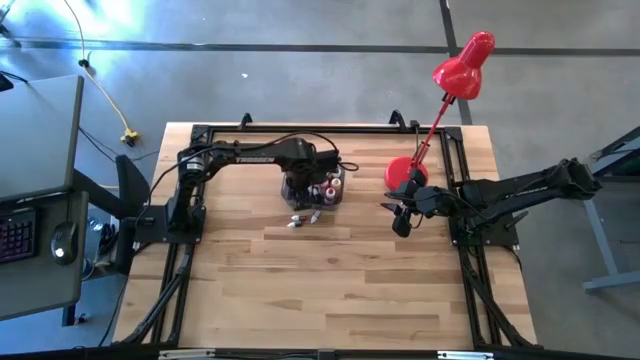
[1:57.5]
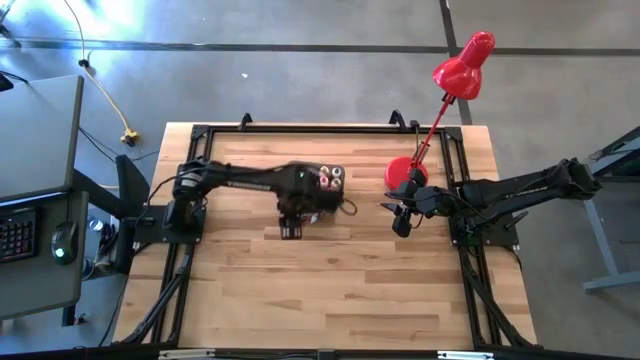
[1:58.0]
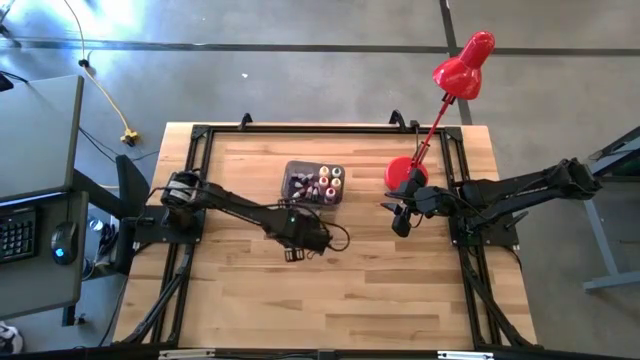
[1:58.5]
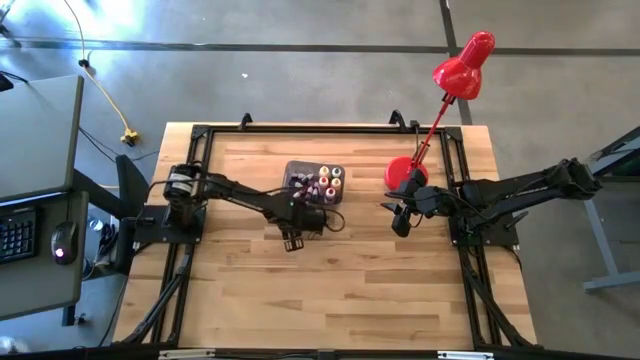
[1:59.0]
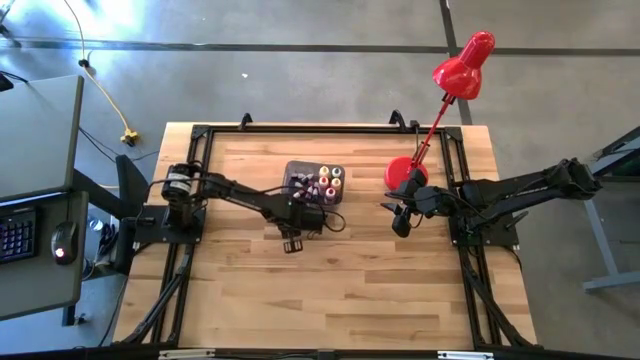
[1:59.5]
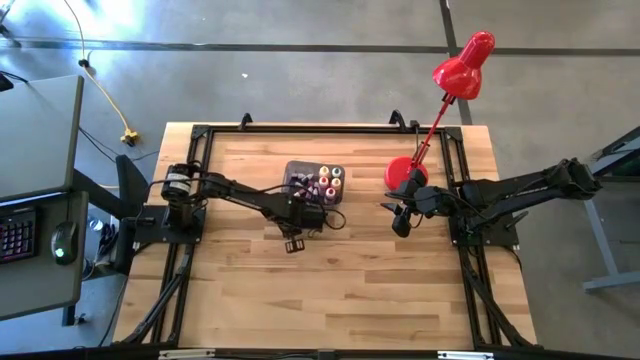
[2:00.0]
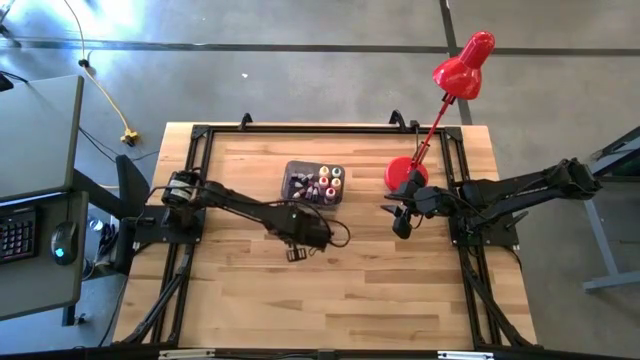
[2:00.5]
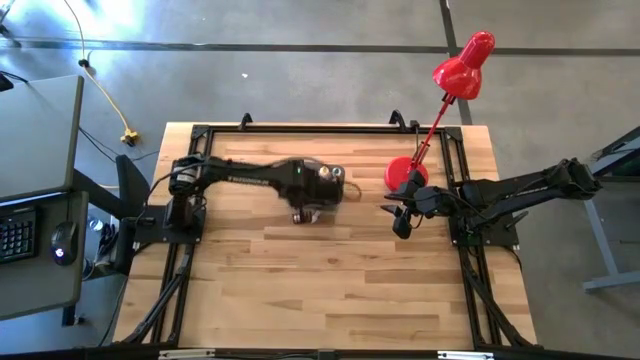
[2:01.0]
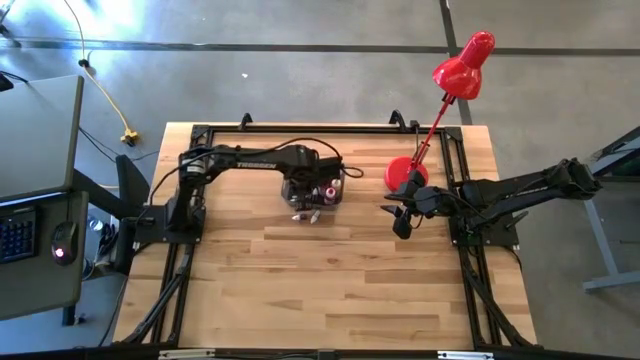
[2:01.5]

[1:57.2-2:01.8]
Task: Pick & Place food coloring
Put the small green food coloring bottle into the black bin

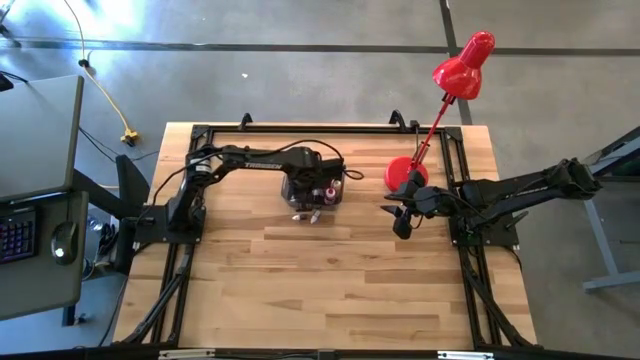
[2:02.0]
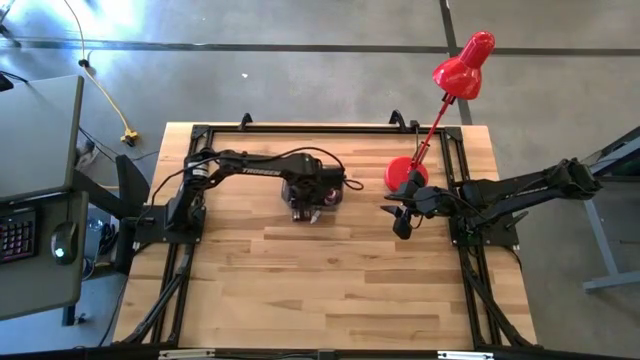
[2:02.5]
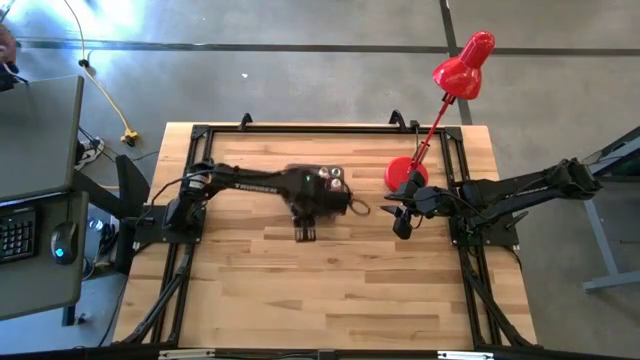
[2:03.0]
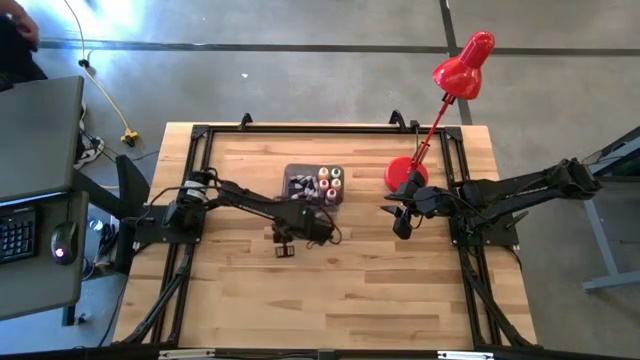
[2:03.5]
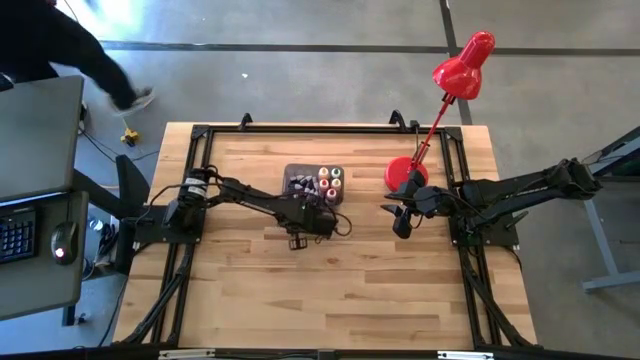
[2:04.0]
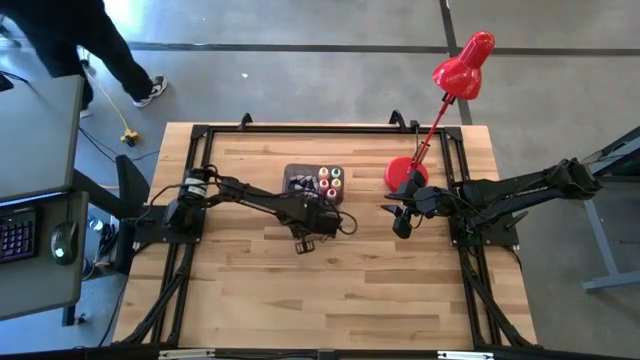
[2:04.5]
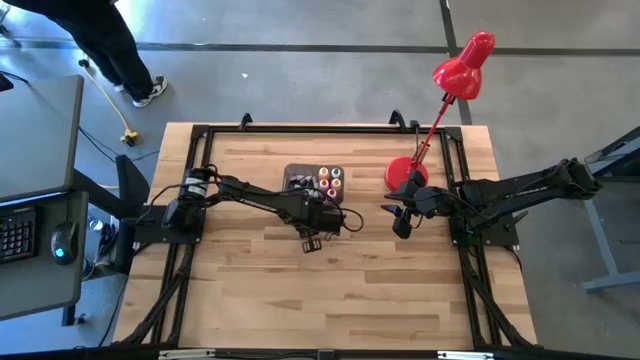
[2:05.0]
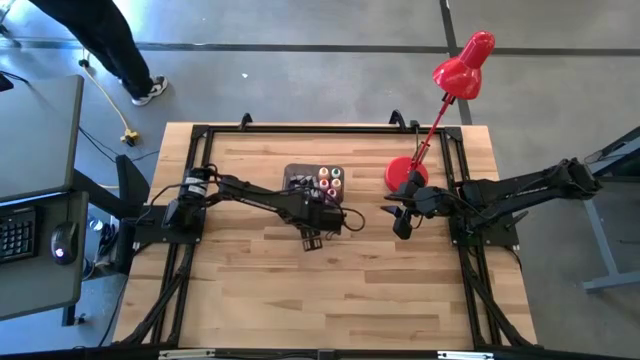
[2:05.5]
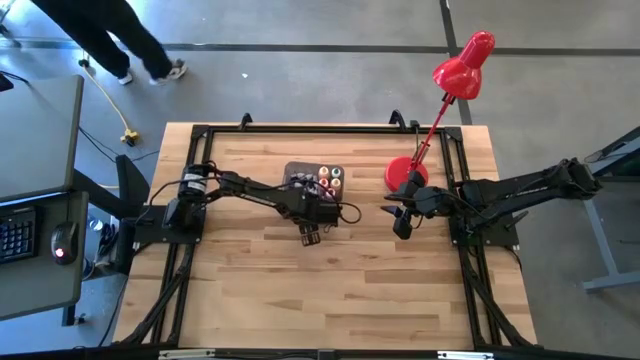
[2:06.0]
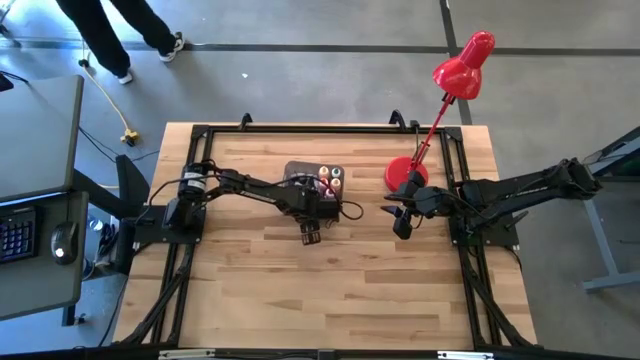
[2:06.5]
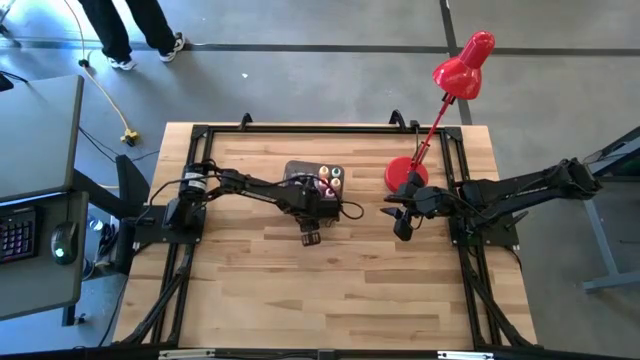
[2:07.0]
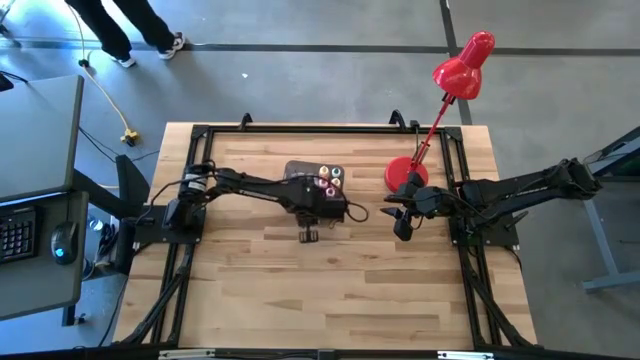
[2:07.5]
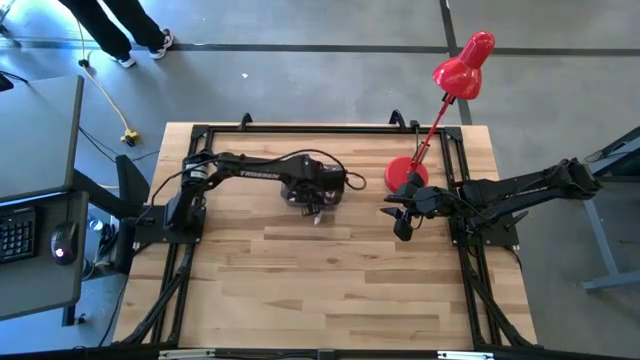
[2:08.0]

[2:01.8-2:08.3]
Put the small red food coloring bottle into the black bin

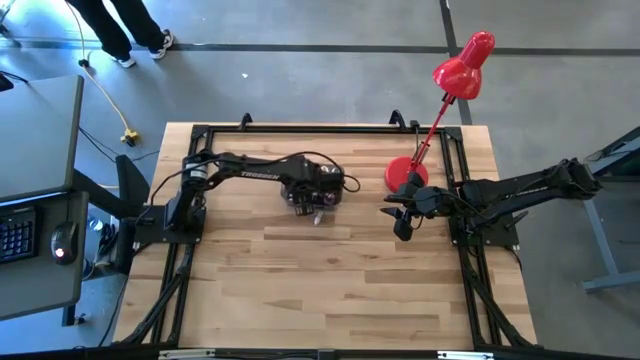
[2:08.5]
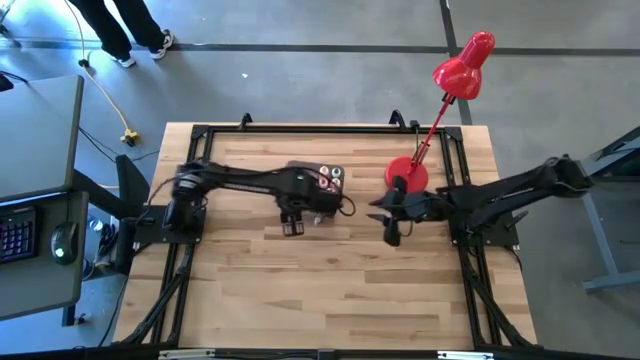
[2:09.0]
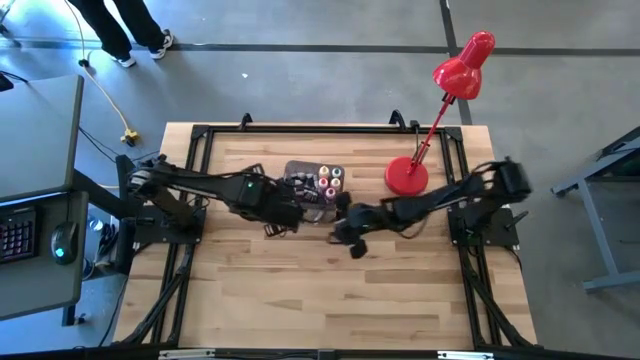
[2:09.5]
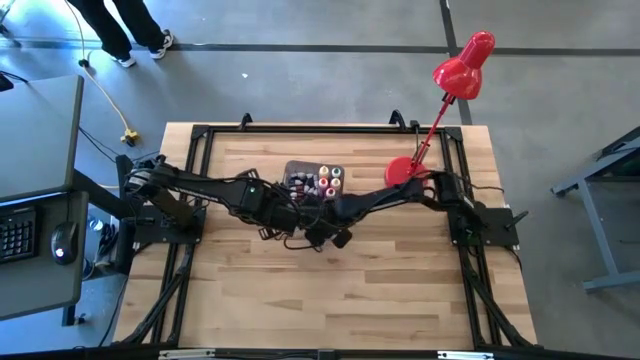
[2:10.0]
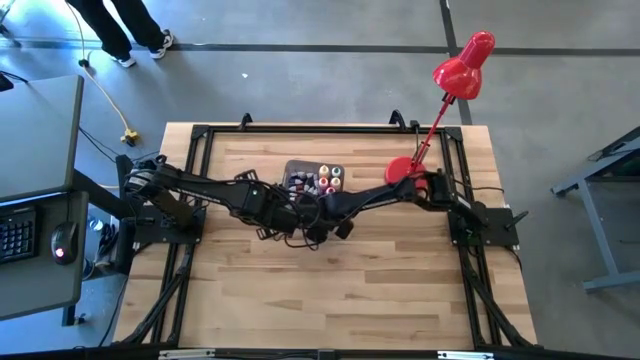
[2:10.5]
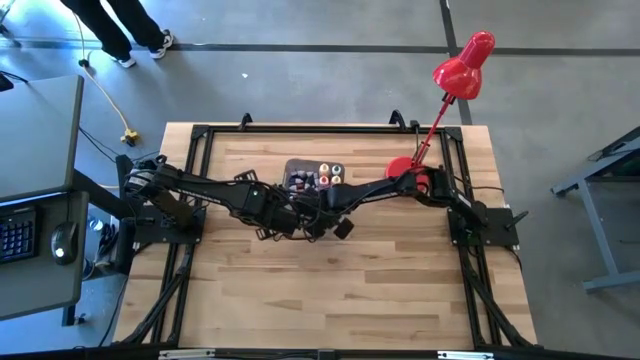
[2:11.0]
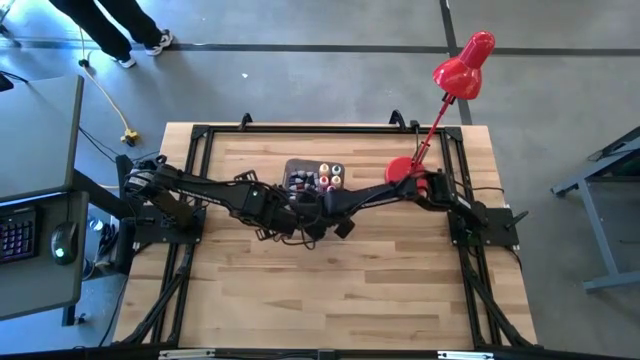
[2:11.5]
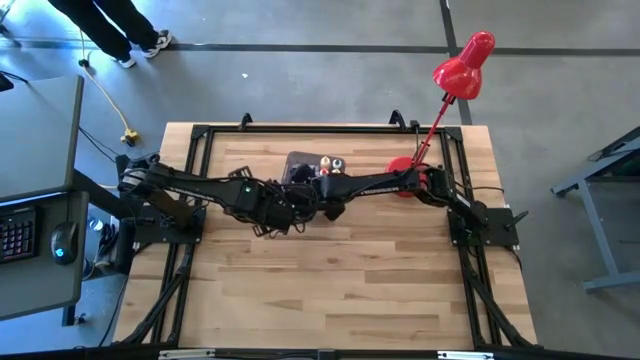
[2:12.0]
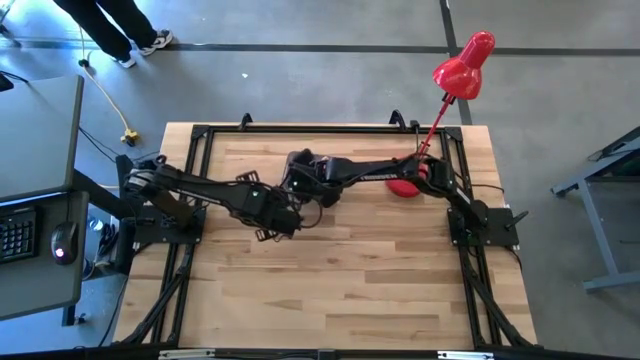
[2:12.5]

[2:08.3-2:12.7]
Put the small blue food coloring bottle into the black bin

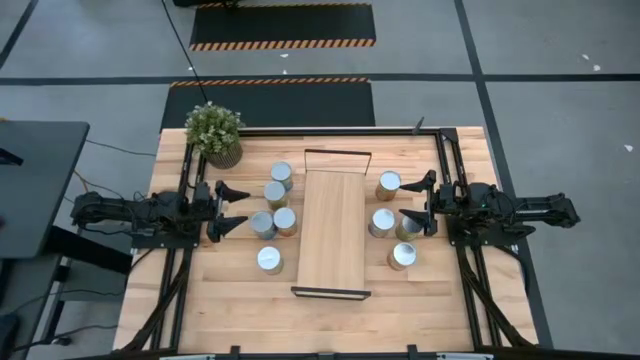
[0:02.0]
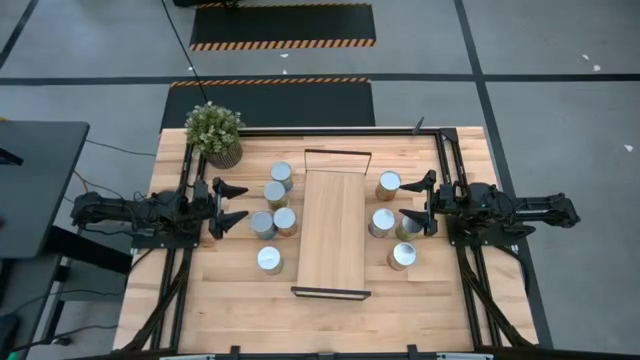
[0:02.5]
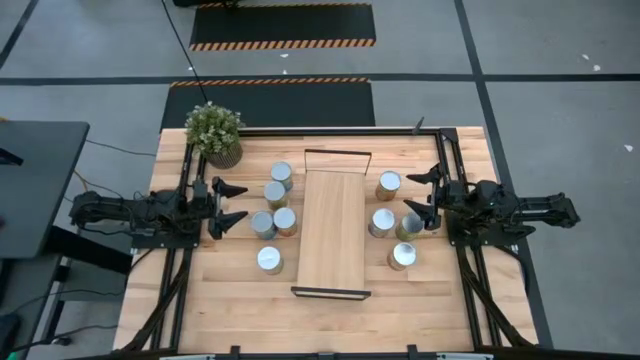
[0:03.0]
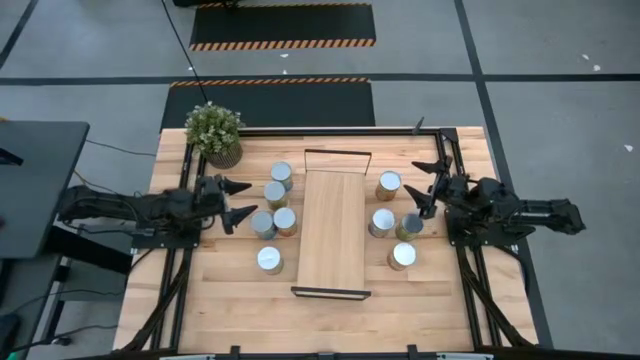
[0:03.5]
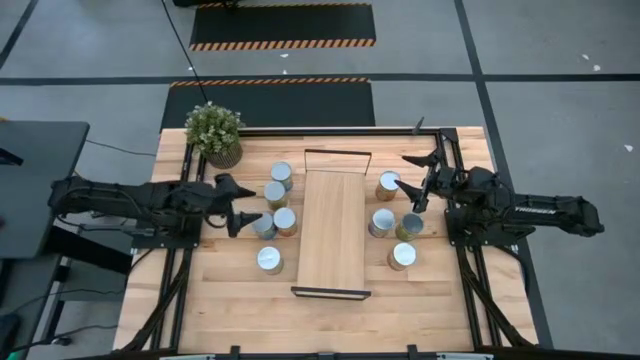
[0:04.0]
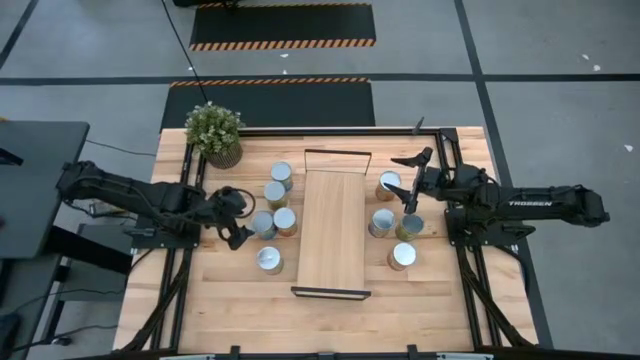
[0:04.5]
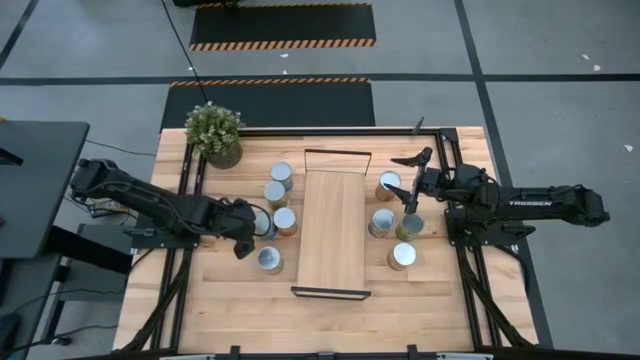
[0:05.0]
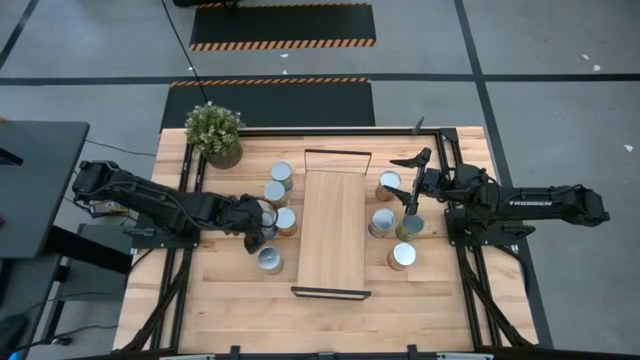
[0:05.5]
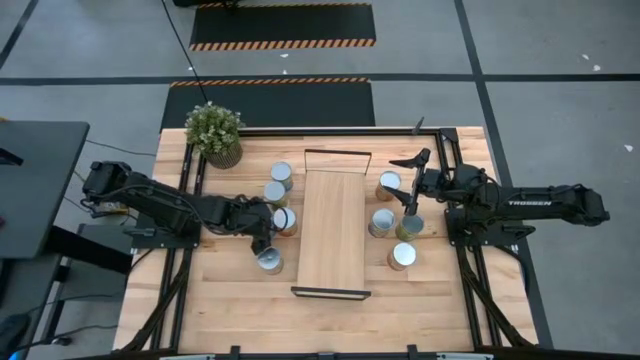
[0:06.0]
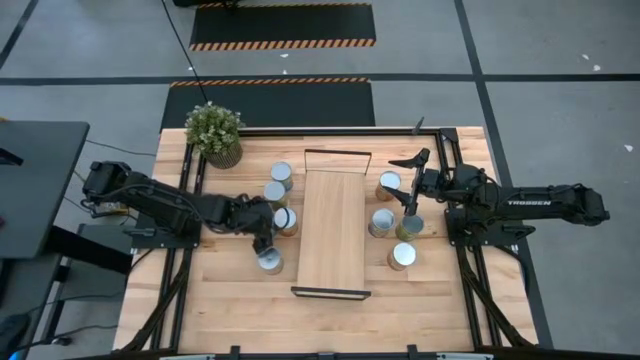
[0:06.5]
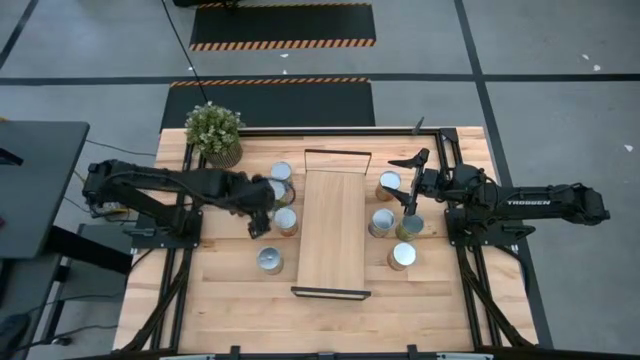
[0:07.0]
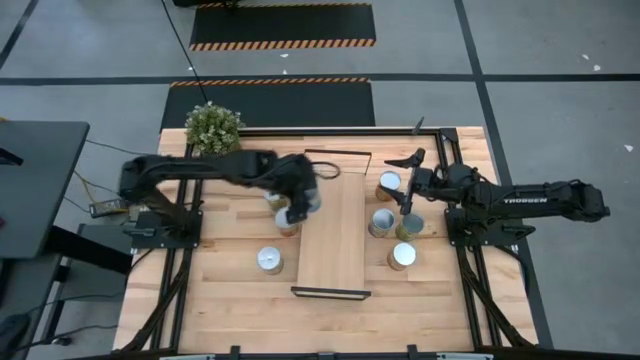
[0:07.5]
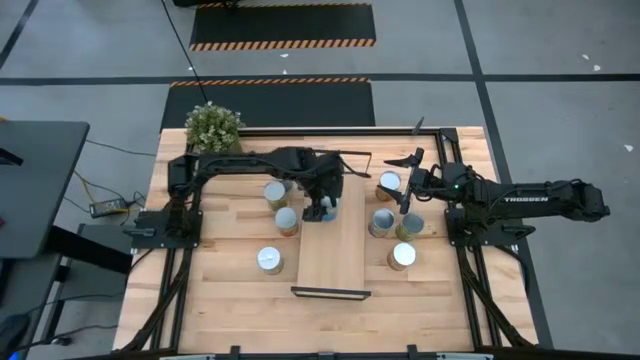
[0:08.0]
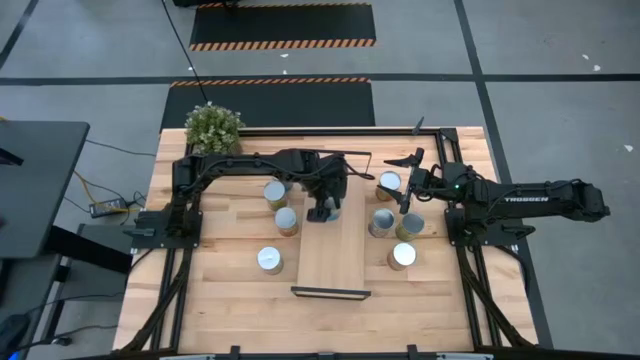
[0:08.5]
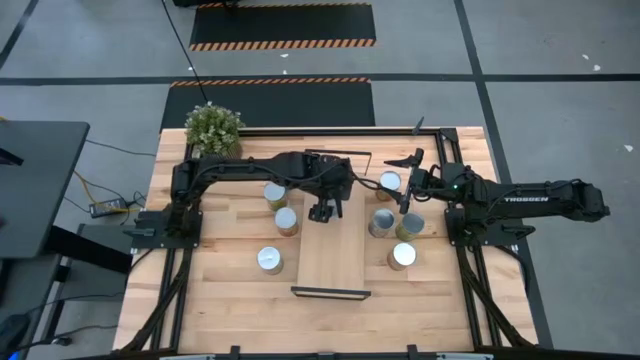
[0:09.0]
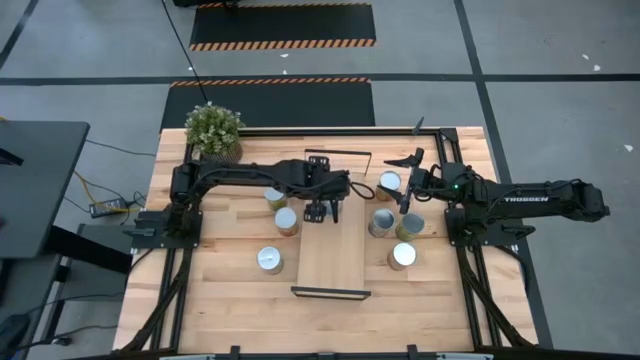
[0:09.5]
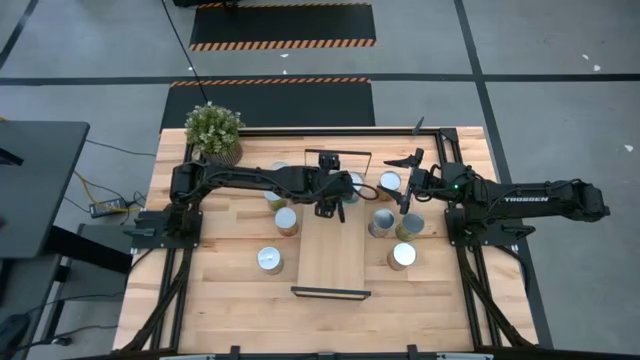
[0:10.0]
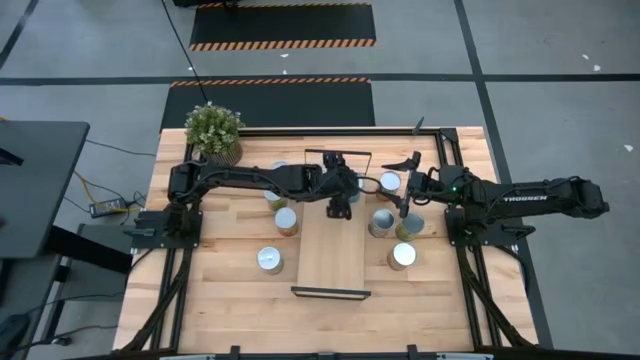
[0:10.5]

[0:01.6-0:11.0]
Task: Pick and place cans onto a shelf
Put the canned cherrys on the shelf
